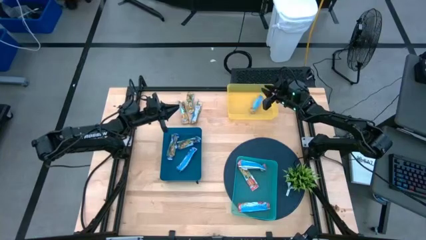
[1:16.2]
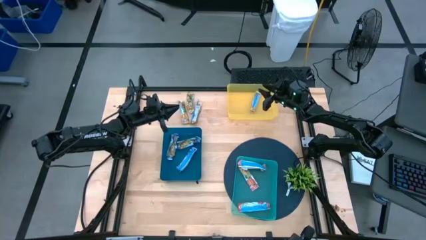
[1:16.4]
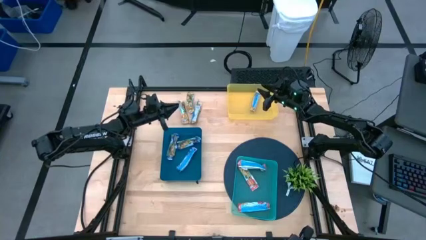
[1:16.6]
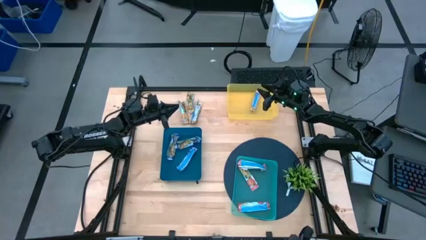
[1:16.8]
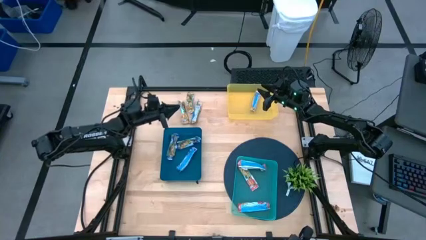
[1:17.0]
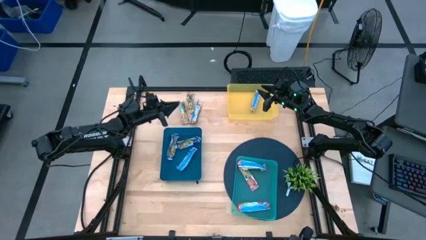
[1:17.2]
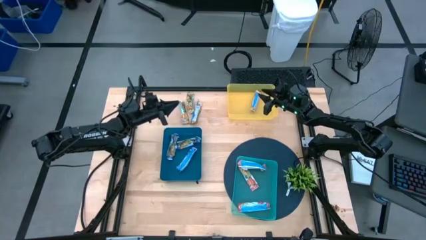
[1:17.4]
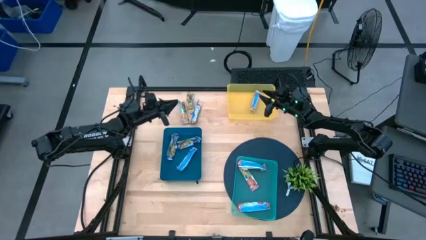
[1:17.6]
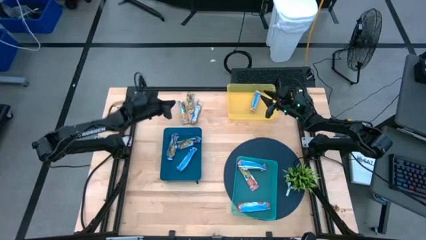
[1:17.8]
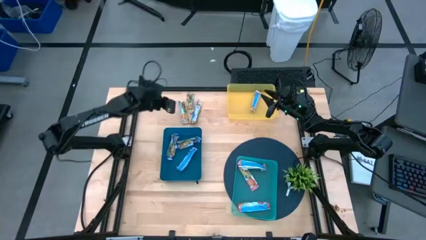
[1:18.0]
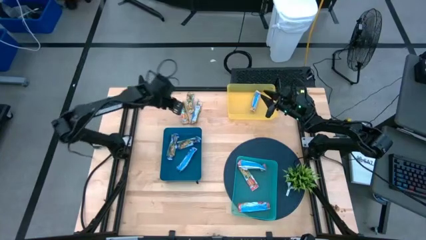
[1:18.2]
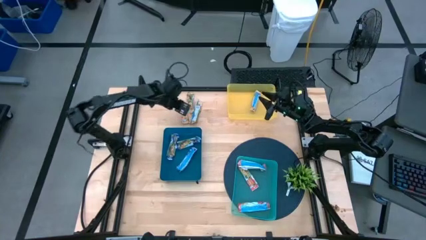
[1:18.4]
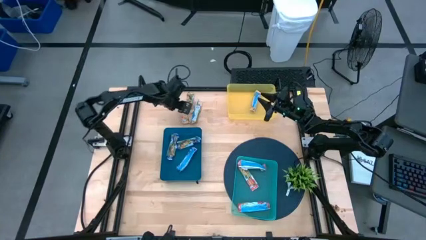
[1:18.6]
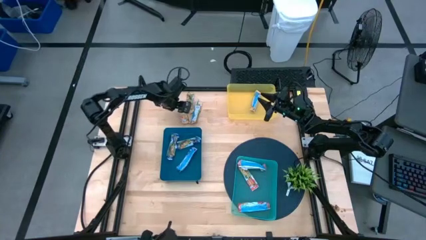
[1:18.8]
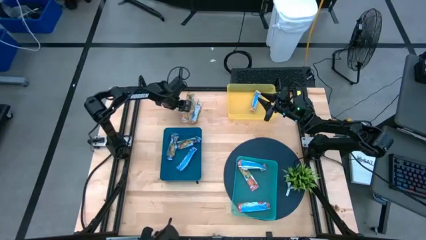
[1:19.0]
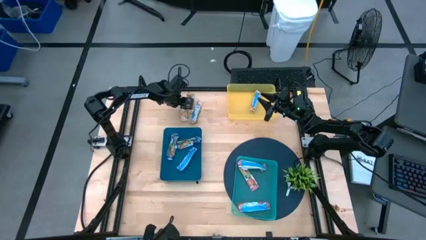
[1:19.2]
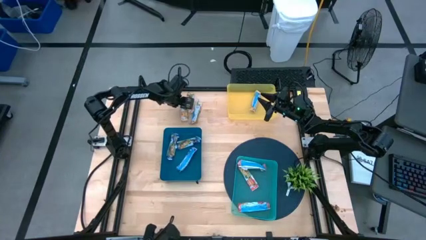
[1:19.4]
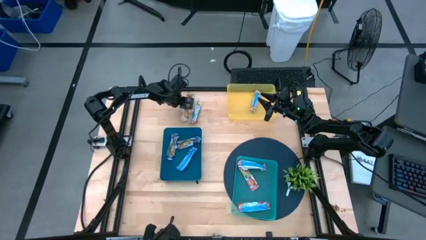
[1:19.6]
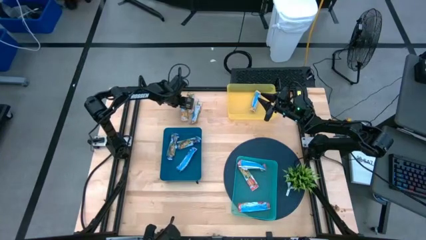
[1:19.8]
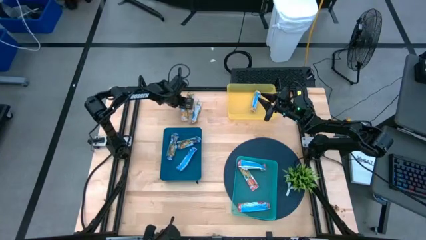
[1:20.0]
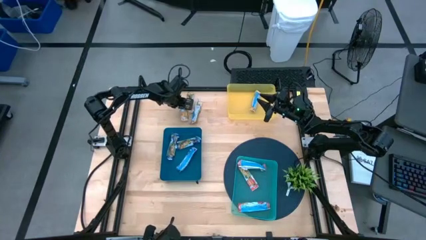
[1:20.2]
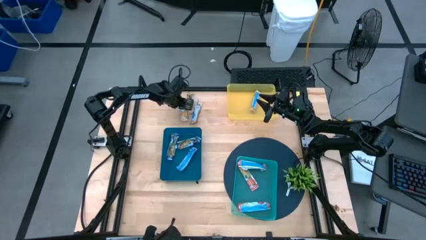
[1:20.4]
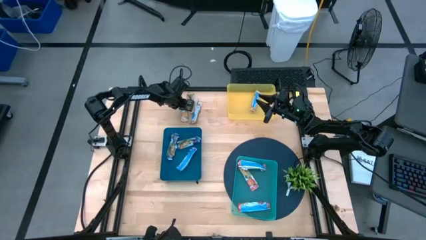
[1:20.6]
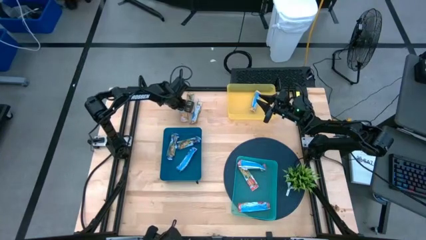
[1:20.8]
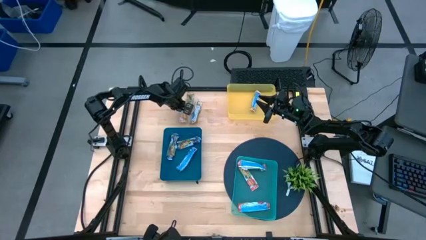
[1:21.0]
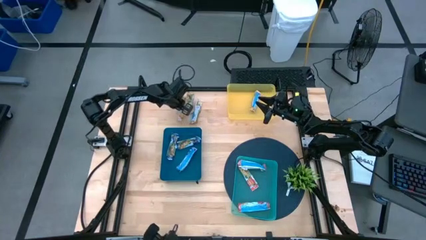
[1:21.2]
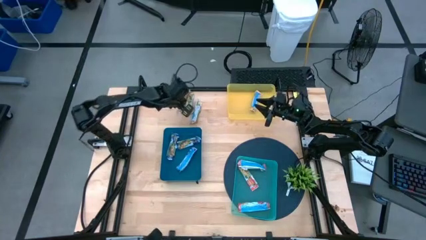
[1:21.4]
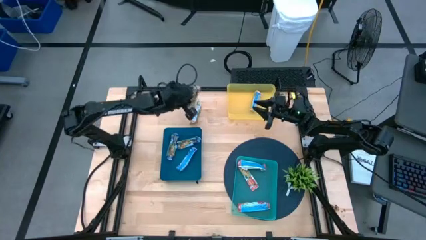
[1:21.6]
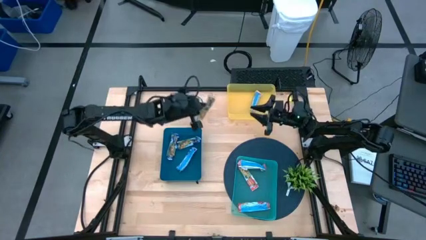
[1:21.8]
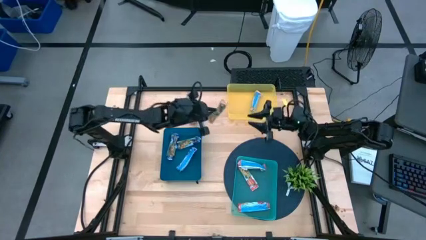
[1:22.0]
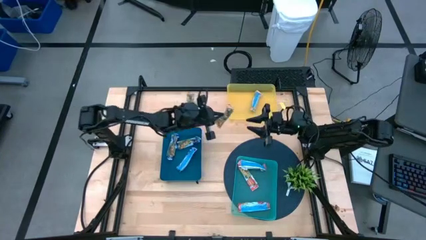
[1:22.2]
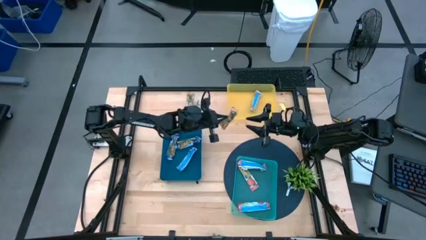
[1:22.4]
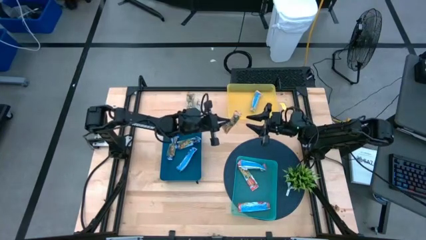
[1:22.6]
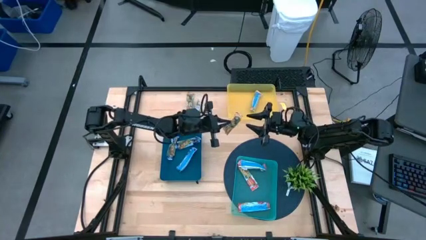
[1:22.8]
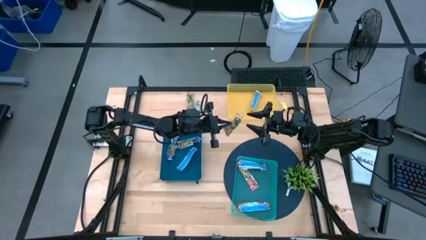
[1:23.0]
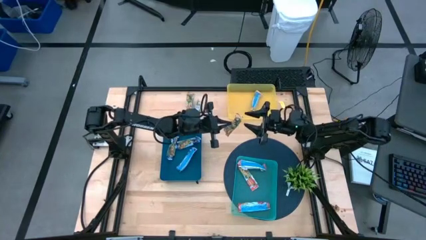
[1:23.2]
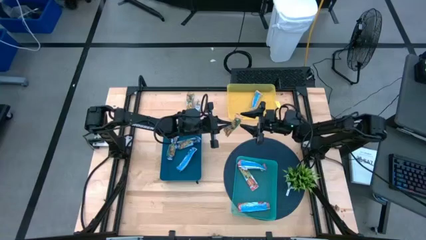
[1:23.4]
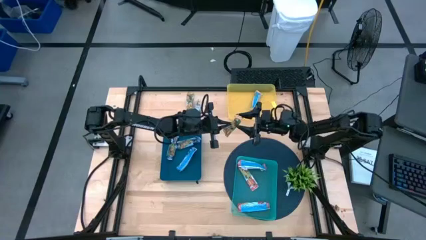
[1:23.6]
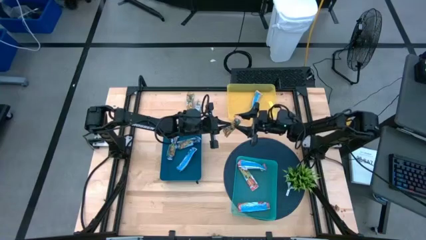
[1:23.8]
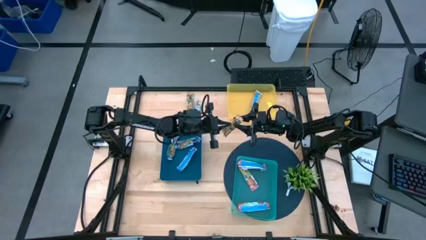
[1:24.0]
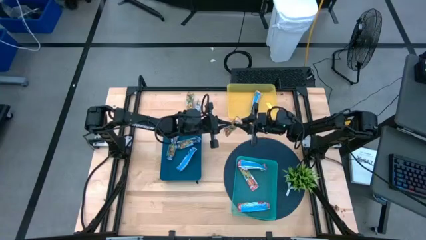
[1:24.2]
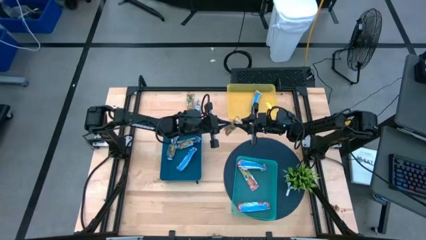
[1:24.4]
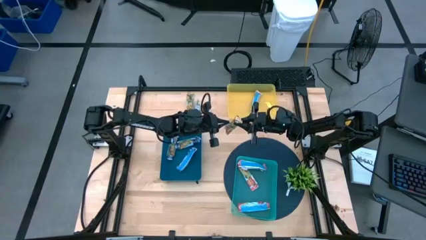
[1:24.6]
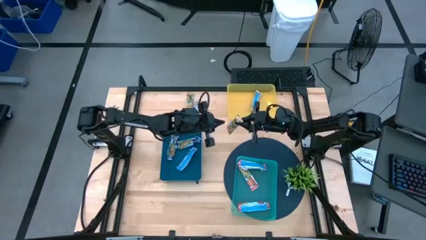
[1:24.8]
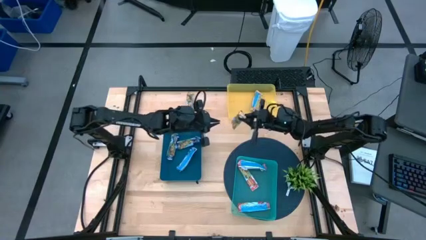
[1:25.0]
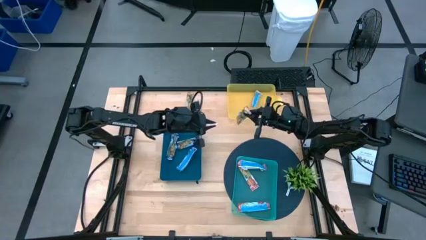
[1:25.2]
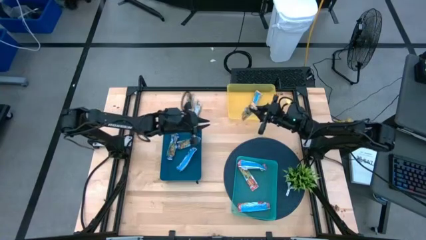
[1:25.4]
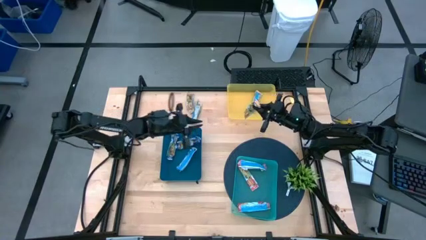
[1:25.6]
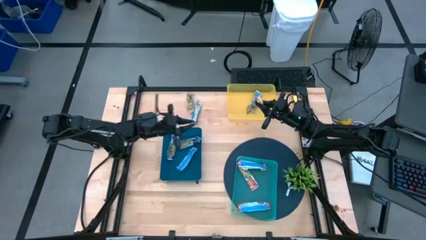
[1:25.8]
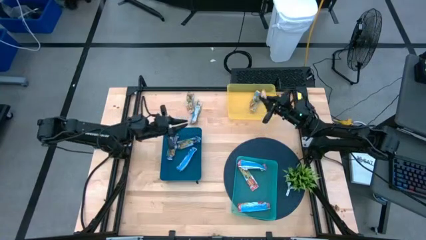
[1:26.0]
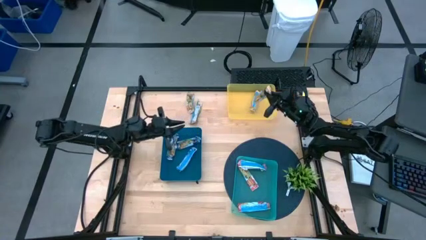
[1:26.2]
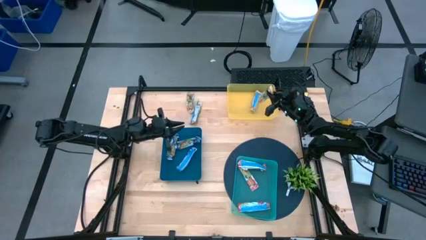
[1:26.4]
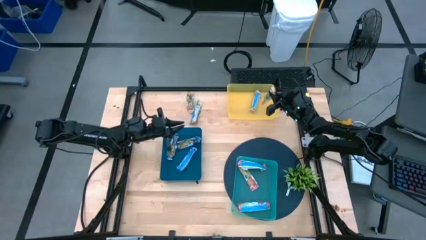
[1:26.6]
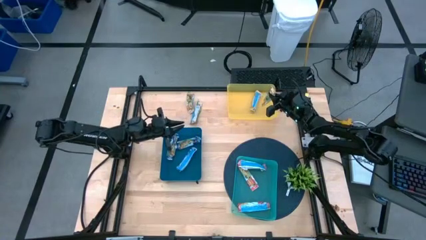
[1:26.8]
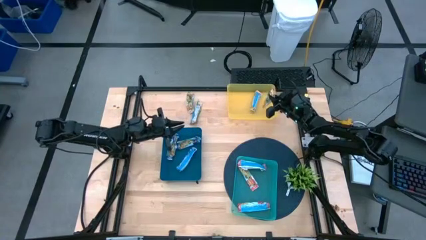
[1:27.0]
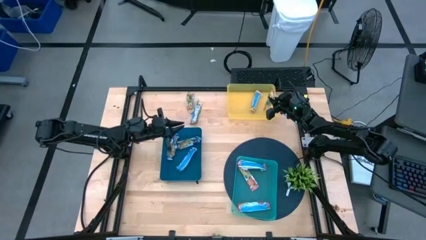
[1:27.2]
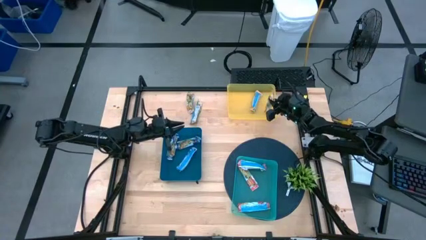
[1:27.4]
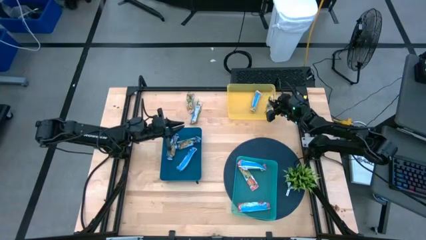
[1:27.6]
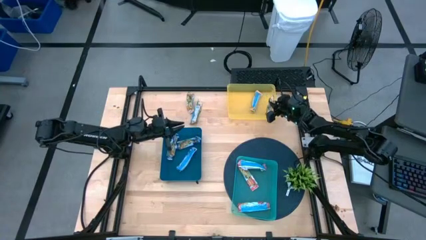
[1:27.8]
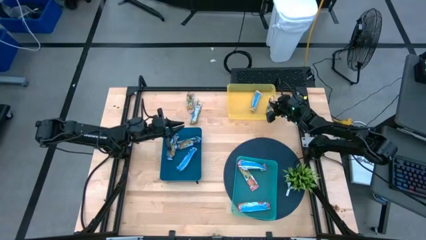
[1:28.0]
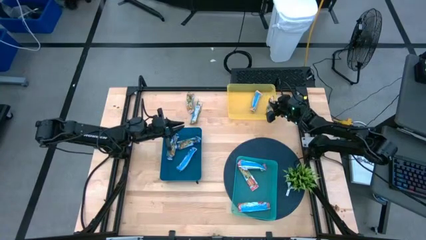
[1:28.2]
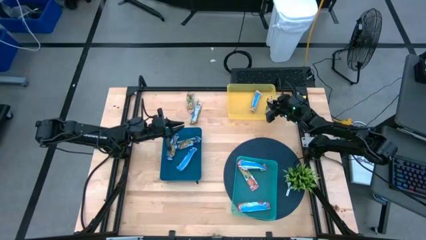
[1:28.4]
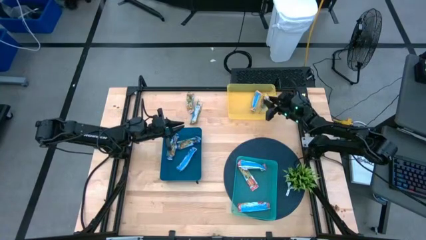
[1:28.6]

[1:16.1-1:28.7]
Task: Pick and place Granola Bars by type
Put the yellow granola bar into the yellow bin
